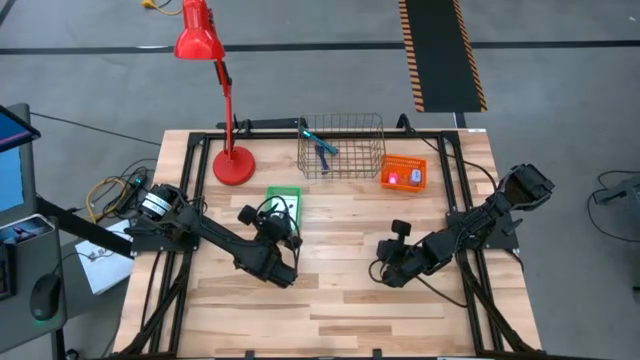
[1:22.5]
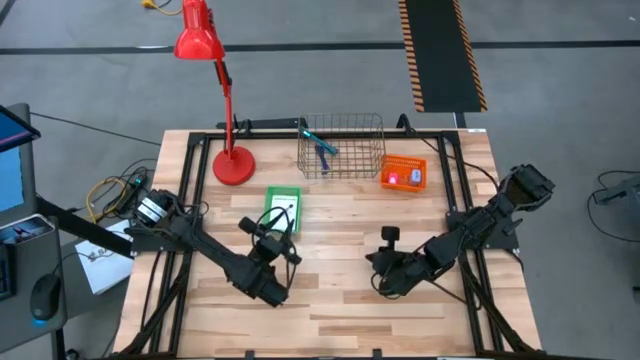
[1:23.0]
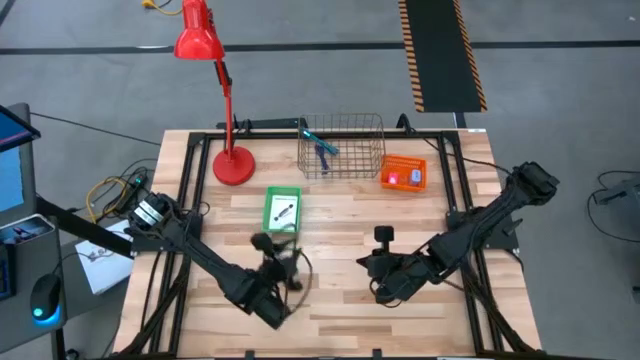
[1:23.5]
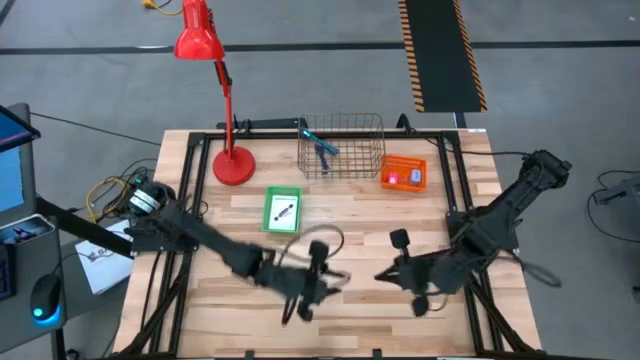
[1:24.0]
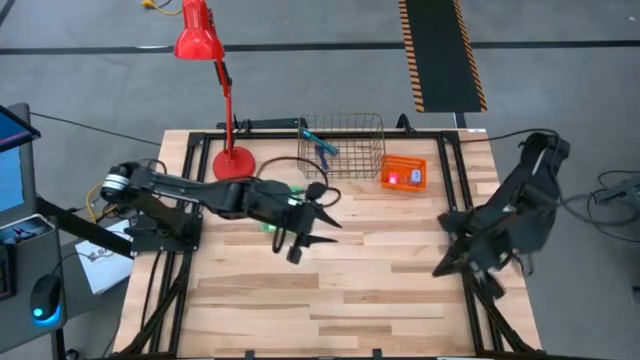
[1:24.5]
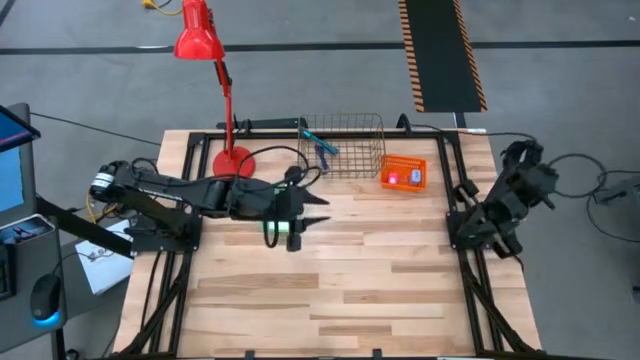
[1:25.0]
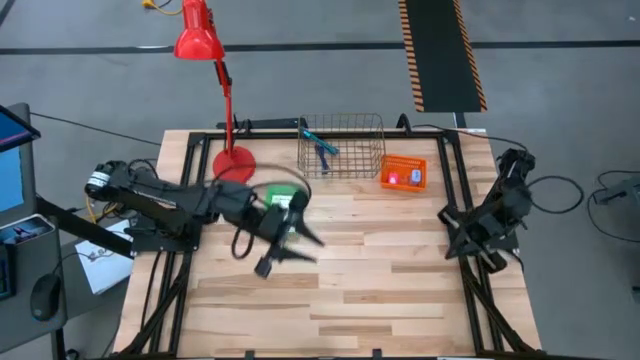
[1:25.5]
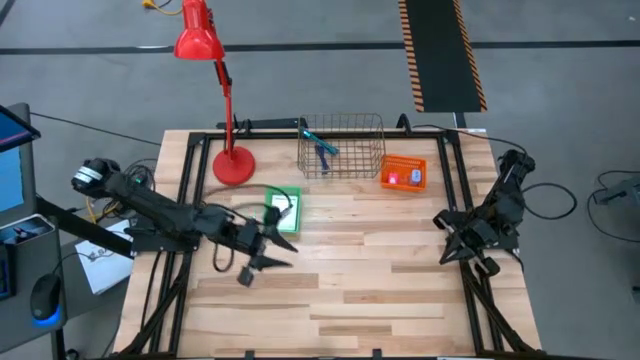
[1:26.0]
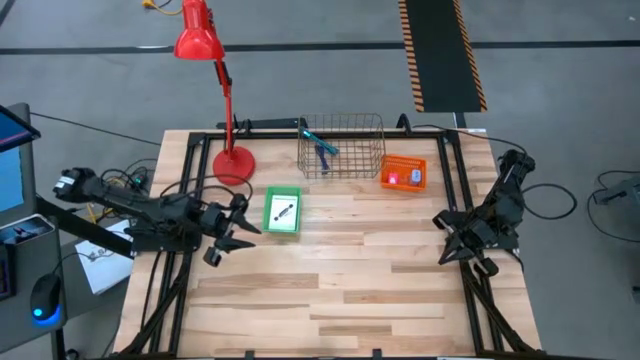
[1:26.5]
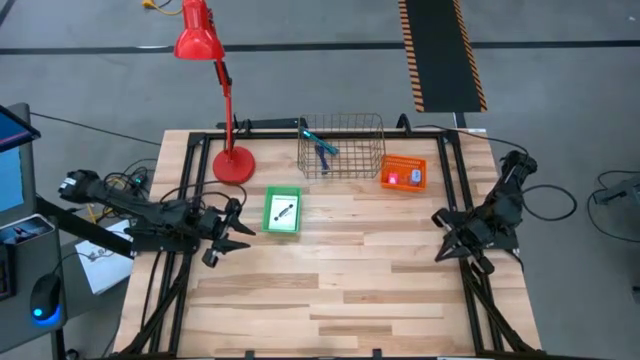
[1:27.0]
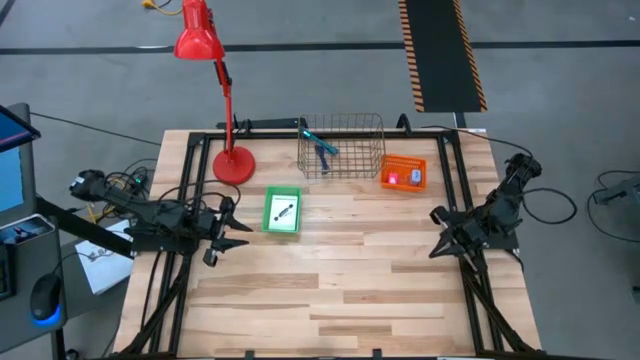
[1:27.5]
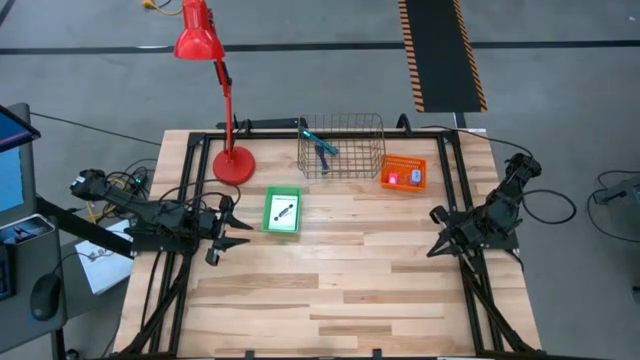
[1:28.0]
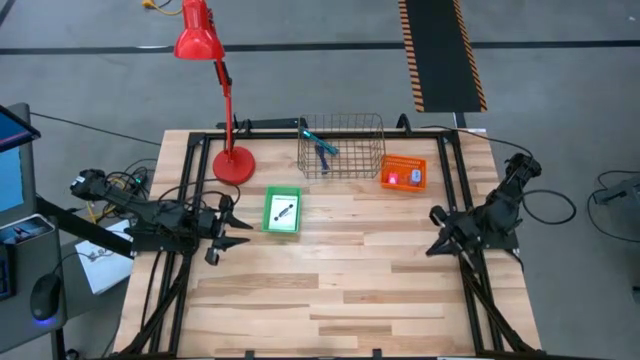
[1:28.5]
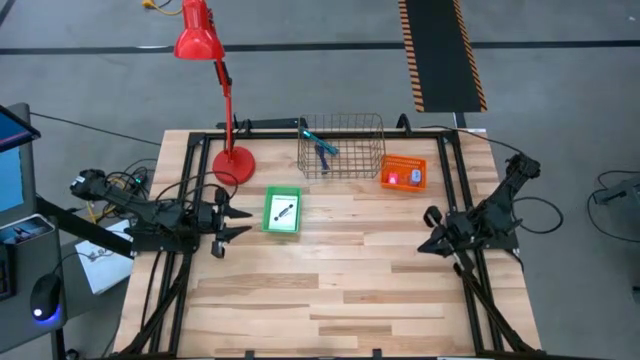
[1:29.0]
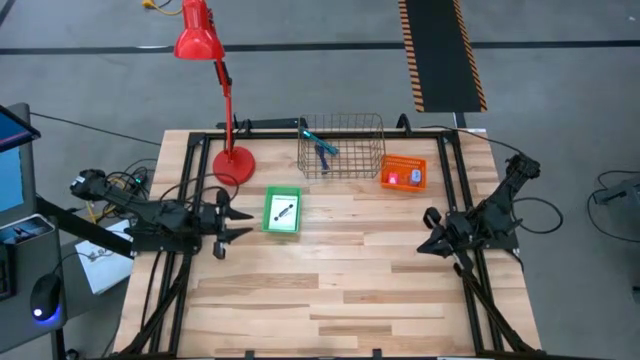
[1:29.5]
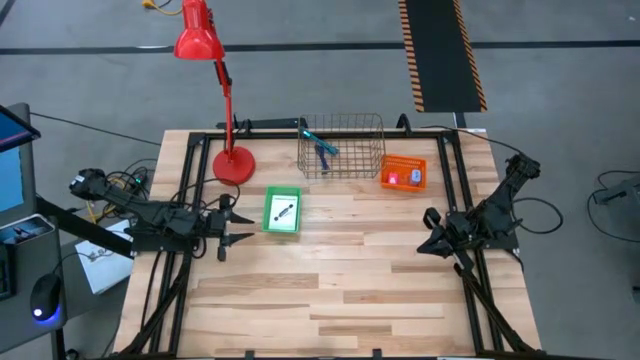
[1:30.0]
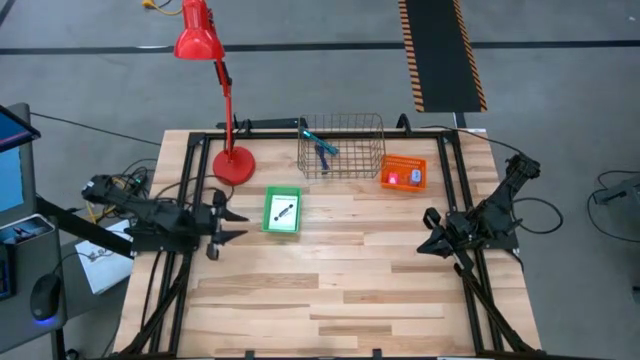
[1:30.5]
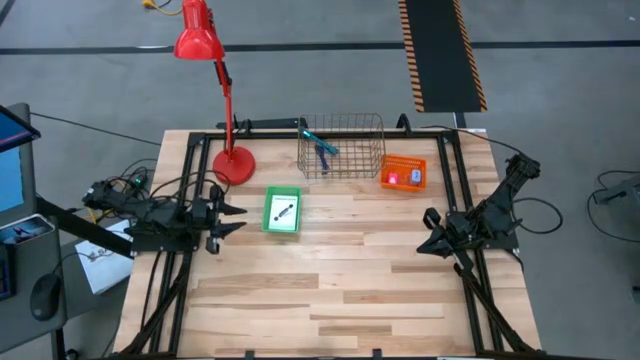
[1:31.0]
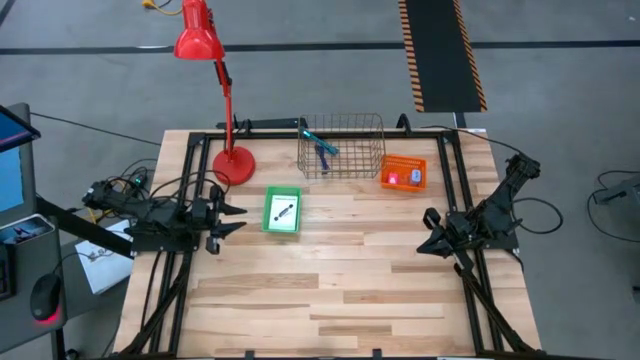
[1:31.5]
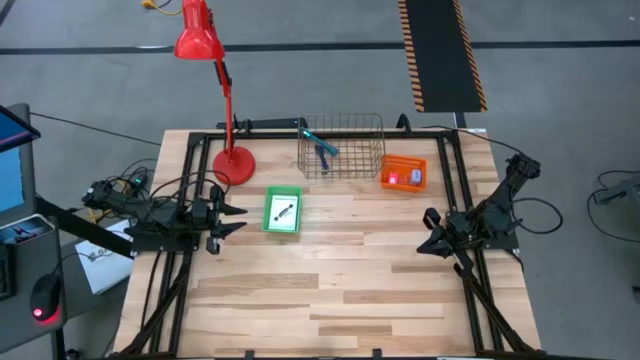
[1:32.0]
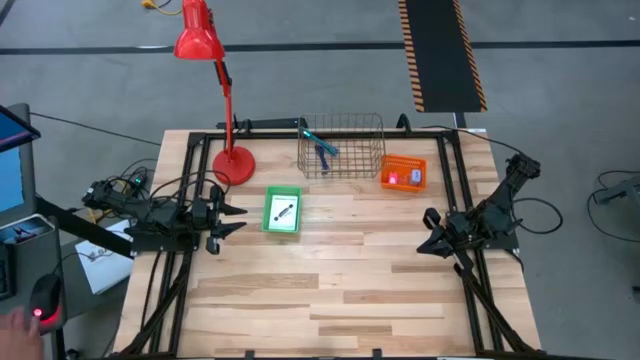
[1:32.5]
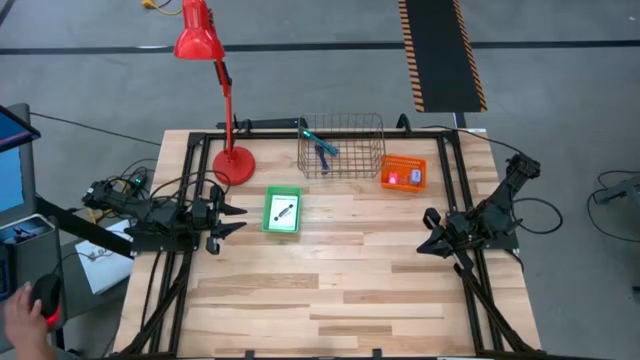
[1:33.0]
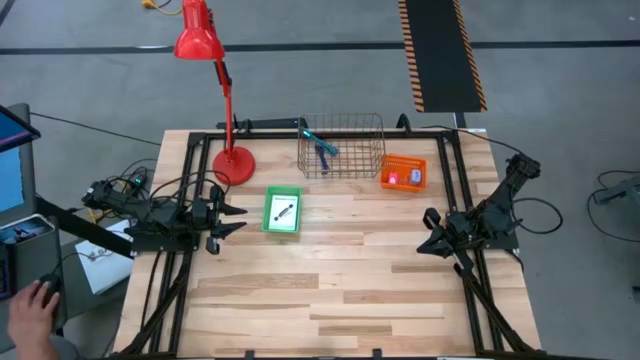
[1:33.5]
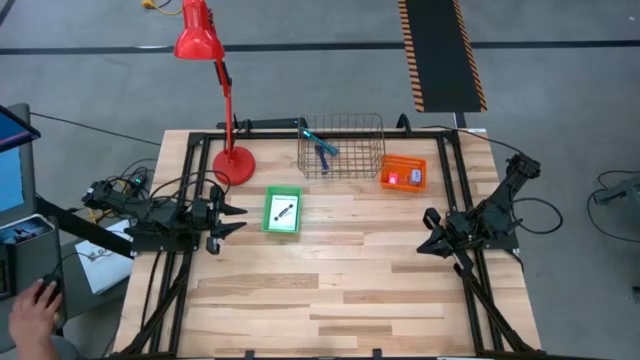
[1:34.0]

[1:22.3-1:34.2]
Task: Pick and place items into bin
Return to Home Position

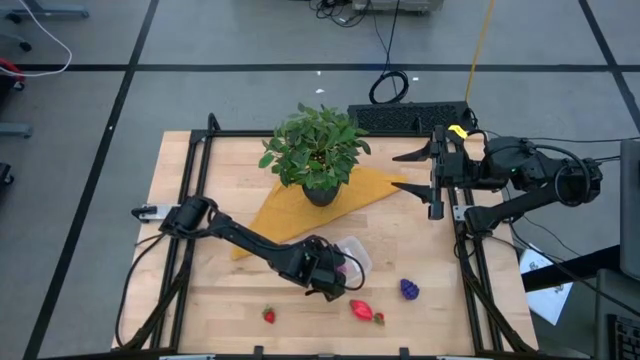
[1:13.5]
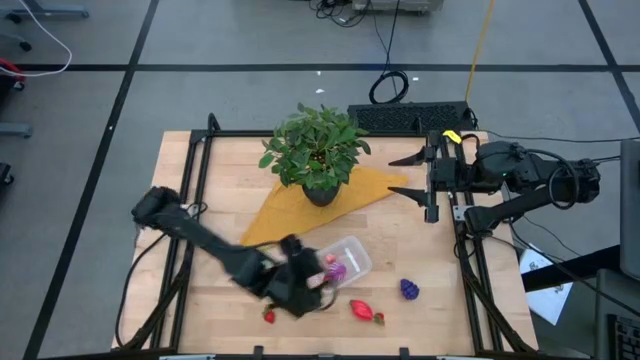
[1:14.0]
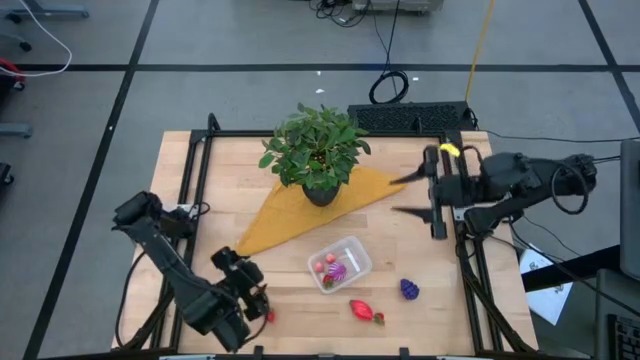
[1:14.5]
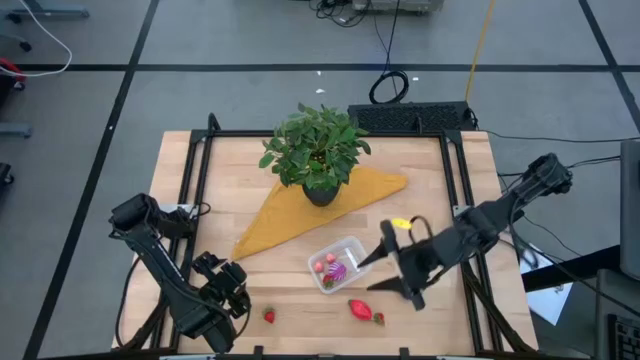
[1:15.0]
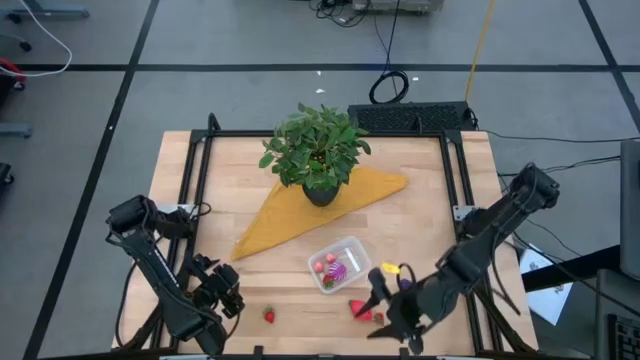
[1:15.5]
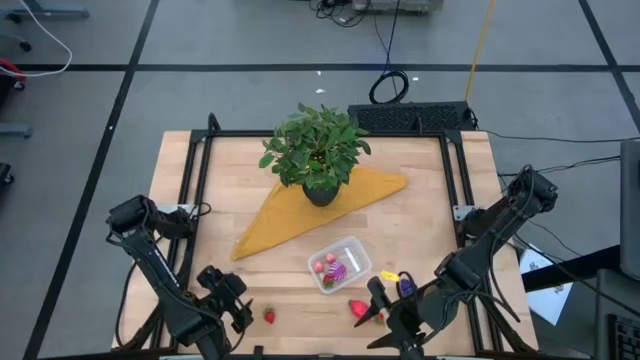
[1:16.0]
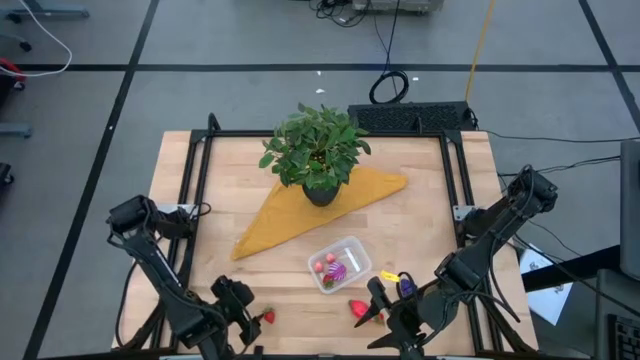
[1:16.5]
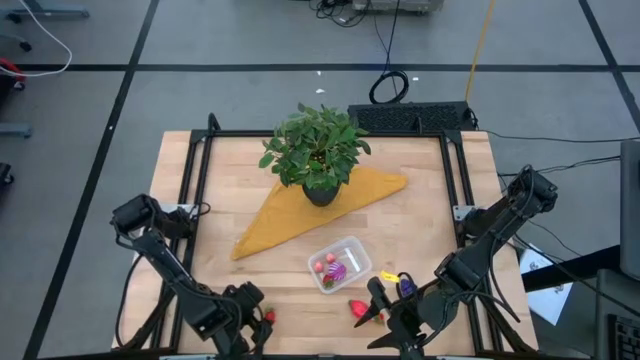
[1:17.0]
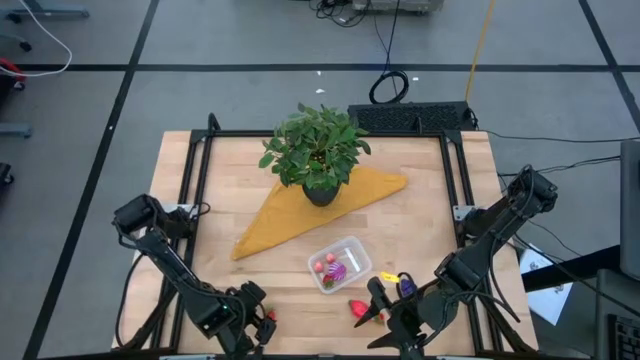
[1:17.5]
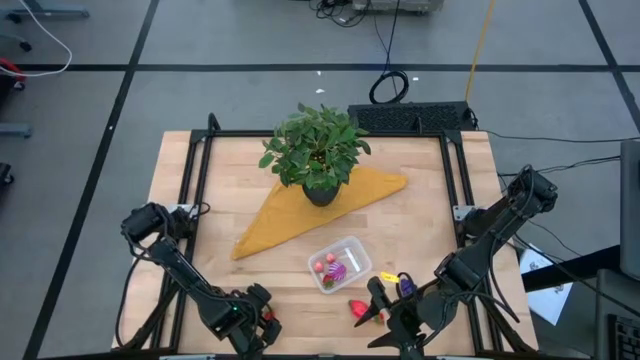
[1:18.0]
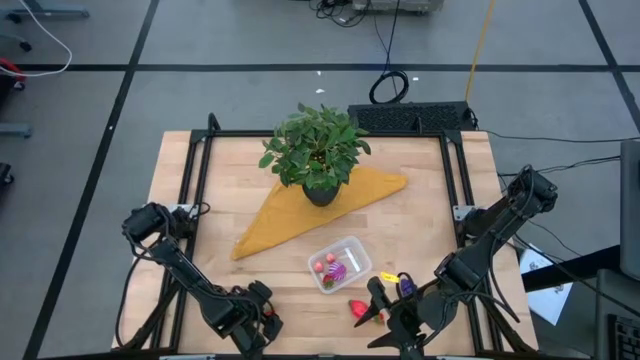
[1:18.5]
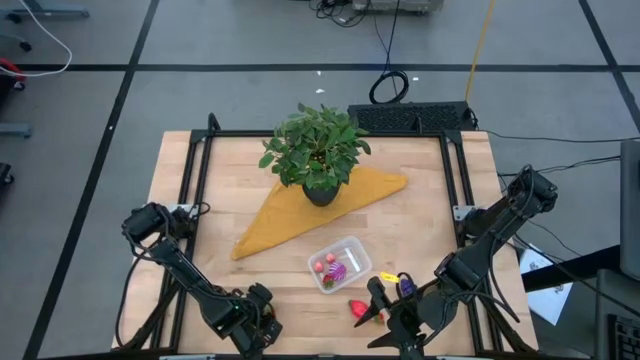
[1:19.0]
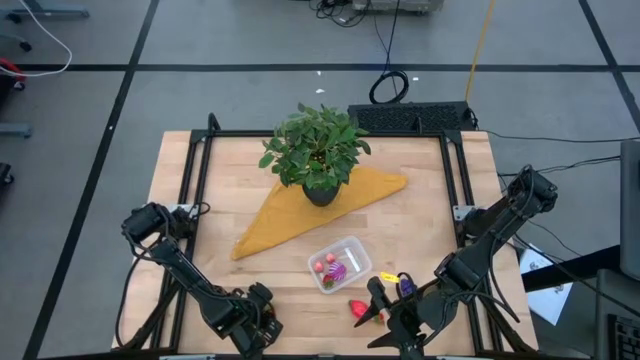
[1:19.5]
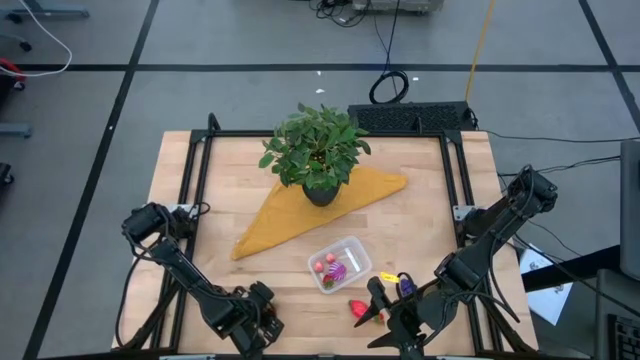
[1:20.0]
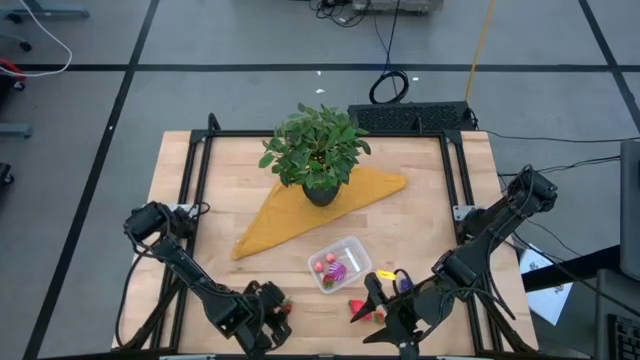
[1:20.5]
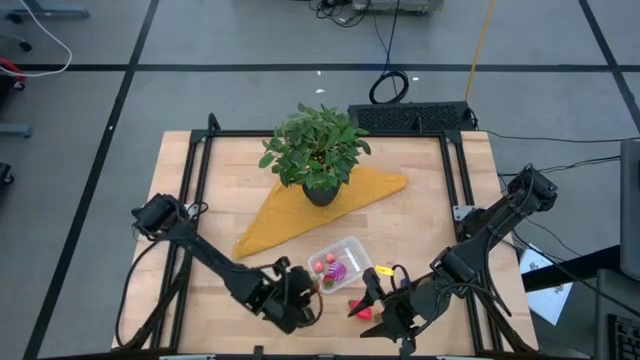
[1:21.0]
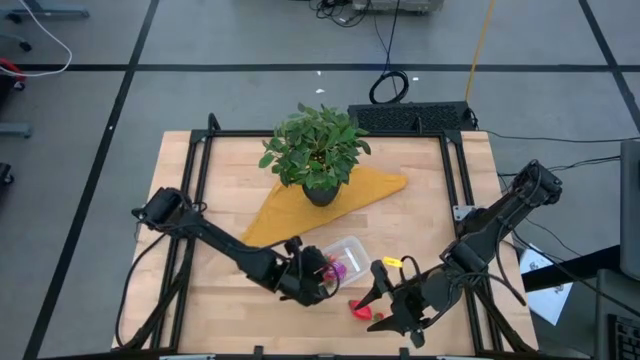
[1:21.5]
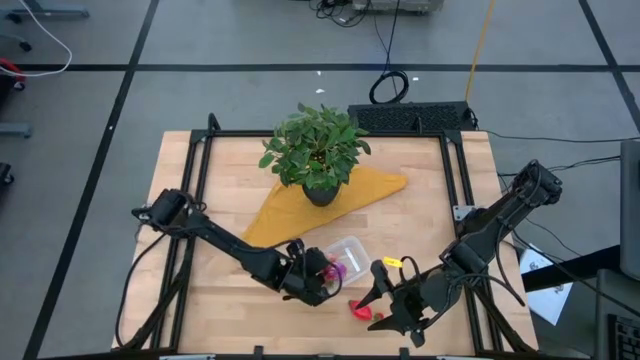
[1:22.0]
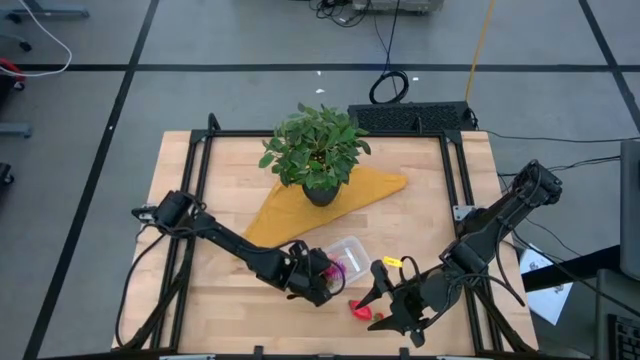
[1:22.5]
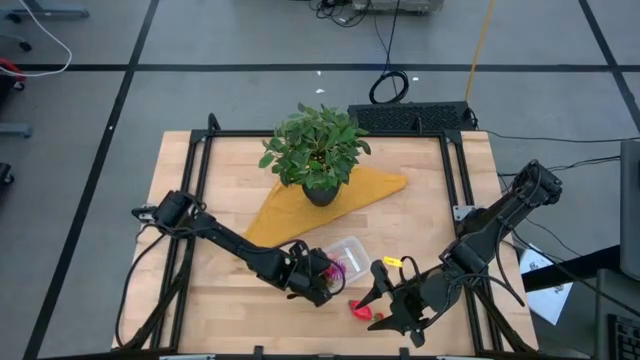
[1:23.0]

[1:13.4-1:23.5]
Task: Pick and placing Produce into tupperware
Put the left strawberry into the transparent bin
